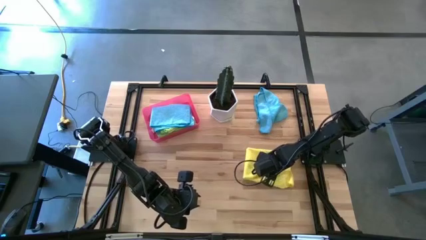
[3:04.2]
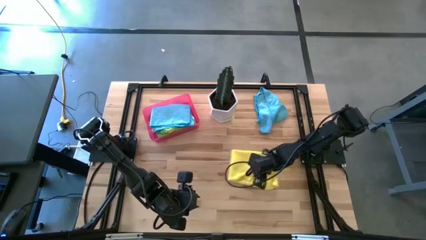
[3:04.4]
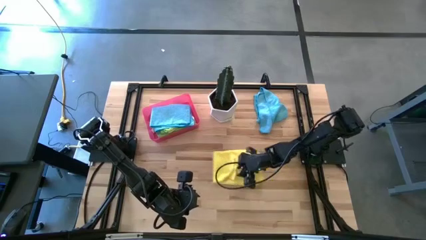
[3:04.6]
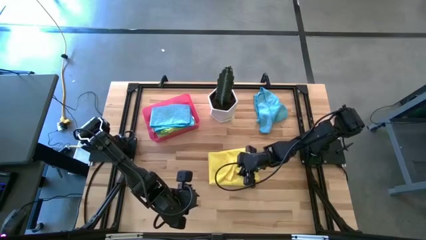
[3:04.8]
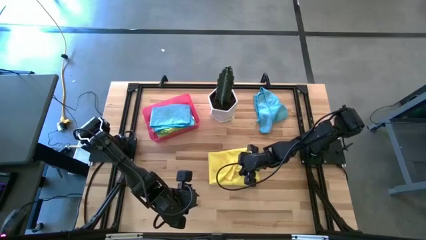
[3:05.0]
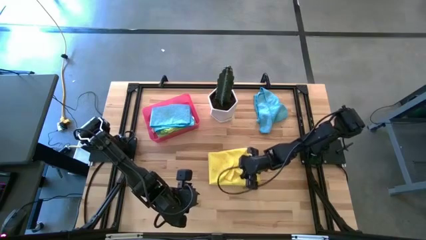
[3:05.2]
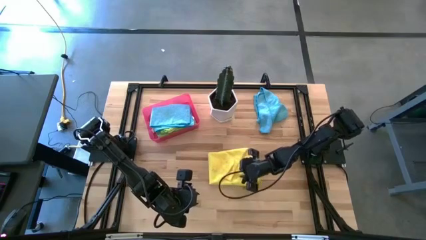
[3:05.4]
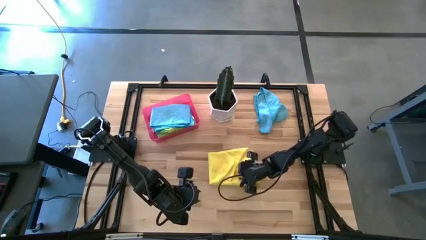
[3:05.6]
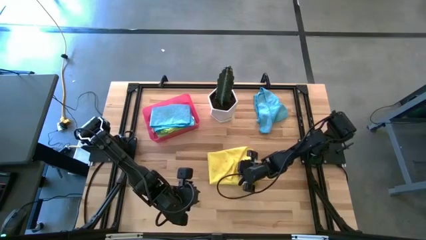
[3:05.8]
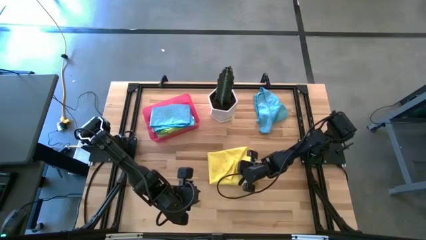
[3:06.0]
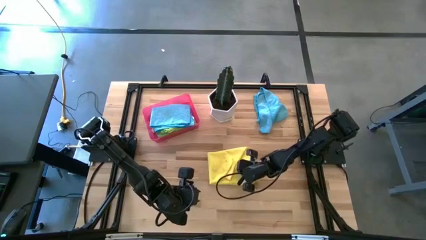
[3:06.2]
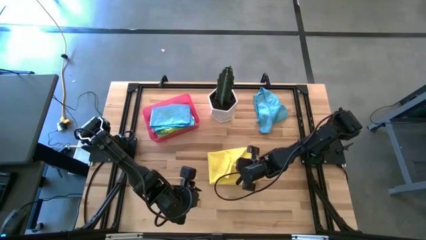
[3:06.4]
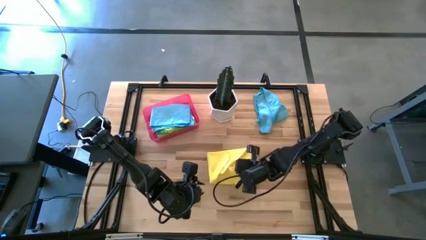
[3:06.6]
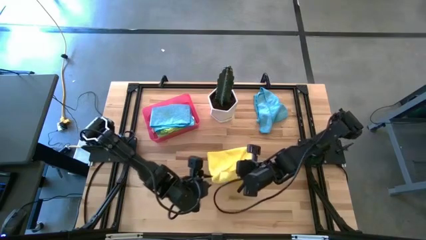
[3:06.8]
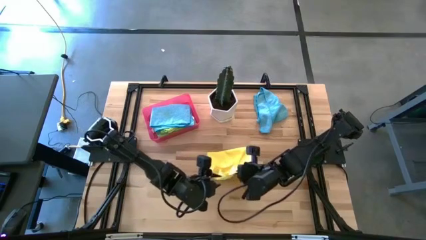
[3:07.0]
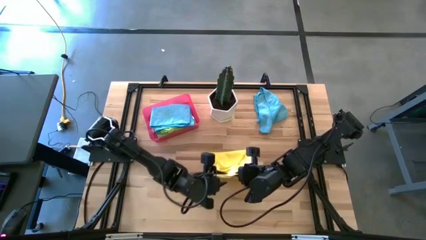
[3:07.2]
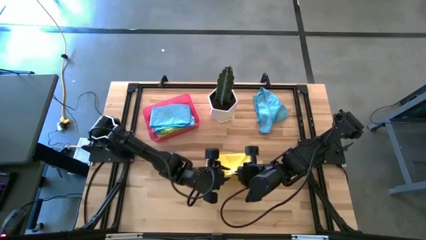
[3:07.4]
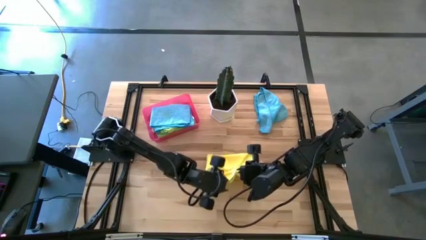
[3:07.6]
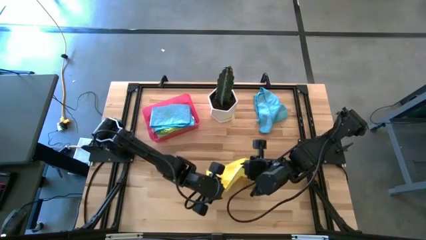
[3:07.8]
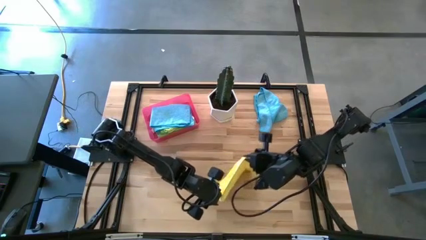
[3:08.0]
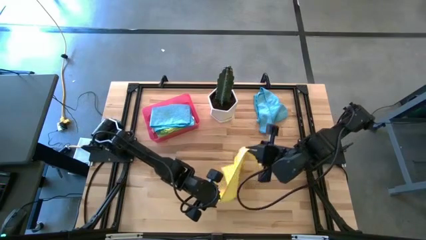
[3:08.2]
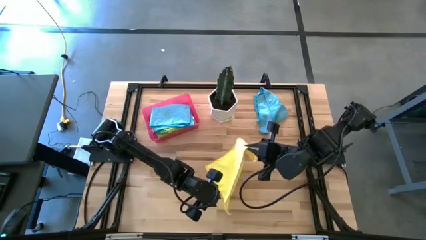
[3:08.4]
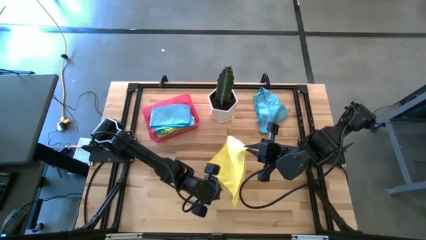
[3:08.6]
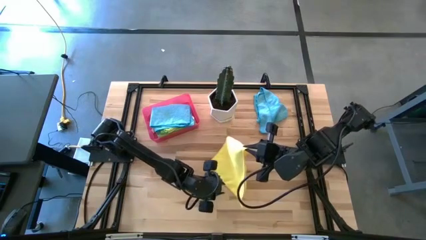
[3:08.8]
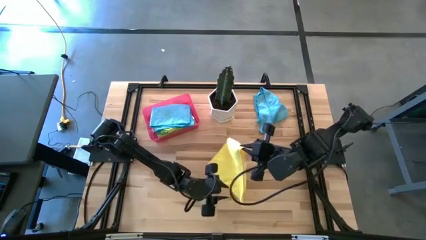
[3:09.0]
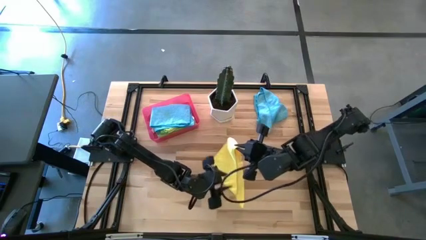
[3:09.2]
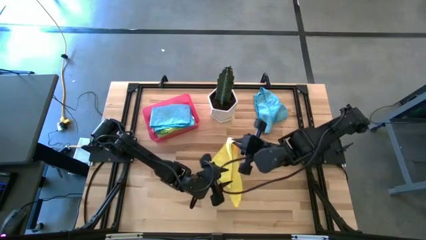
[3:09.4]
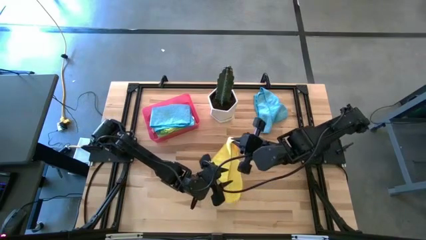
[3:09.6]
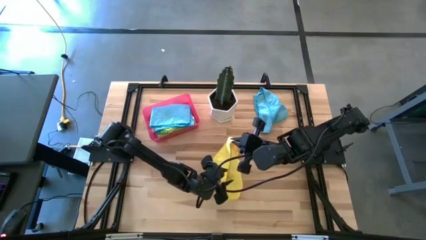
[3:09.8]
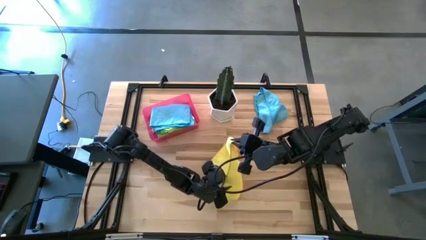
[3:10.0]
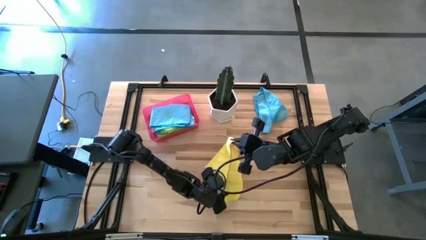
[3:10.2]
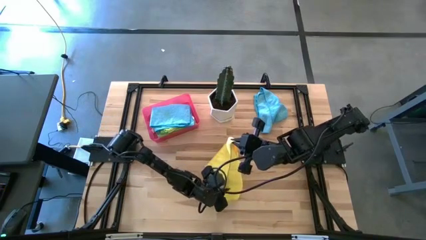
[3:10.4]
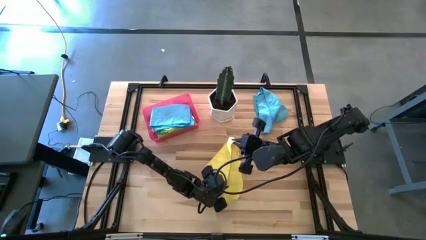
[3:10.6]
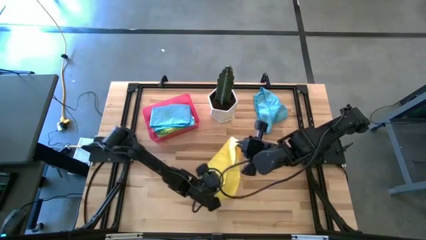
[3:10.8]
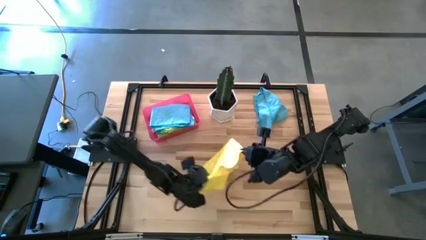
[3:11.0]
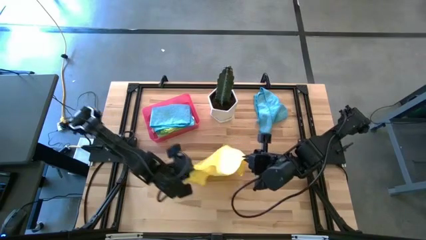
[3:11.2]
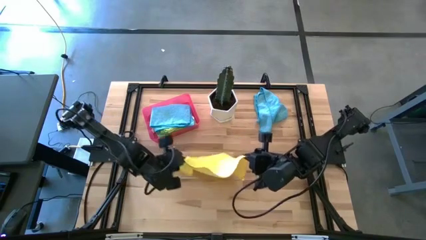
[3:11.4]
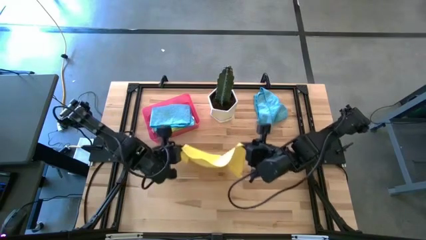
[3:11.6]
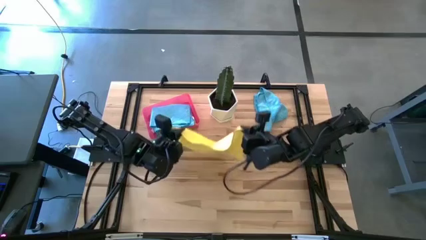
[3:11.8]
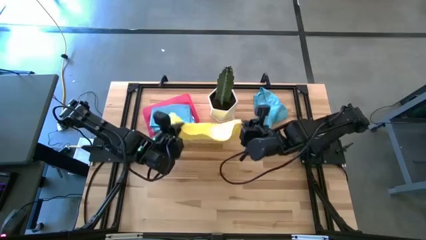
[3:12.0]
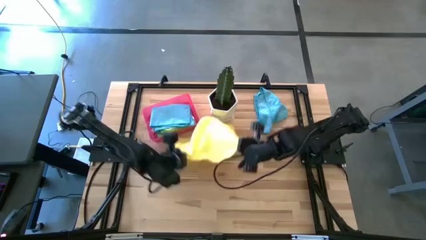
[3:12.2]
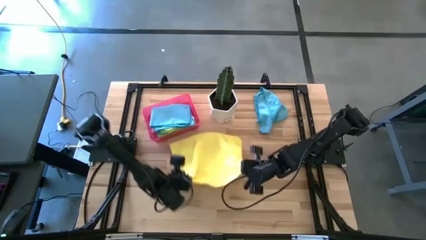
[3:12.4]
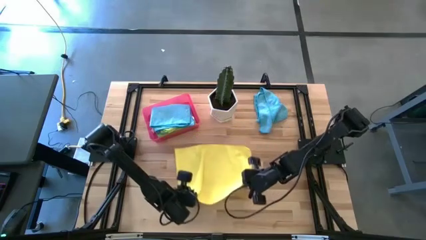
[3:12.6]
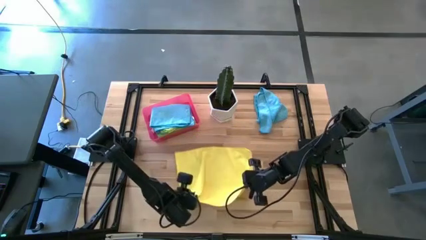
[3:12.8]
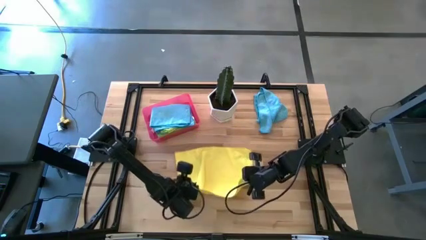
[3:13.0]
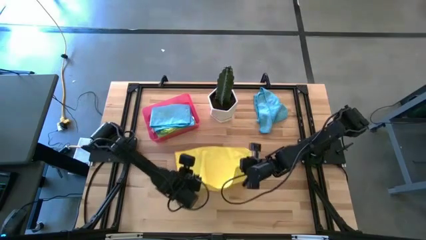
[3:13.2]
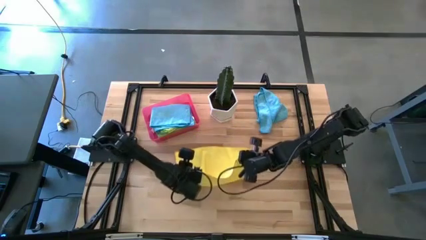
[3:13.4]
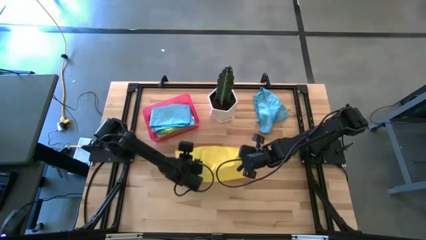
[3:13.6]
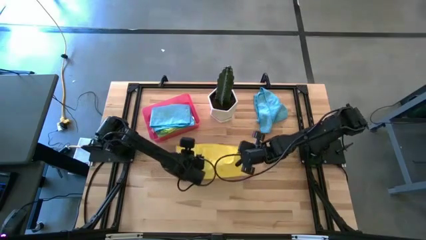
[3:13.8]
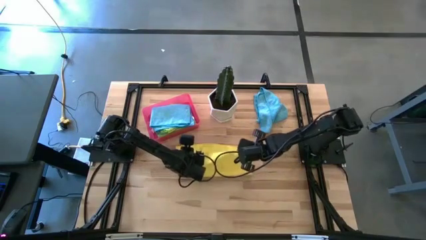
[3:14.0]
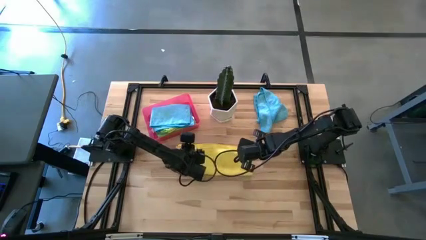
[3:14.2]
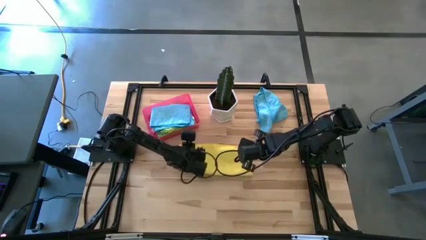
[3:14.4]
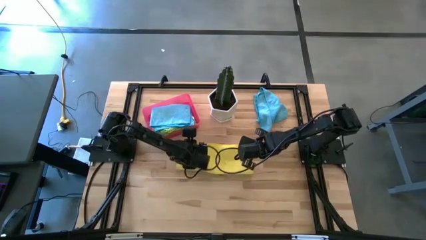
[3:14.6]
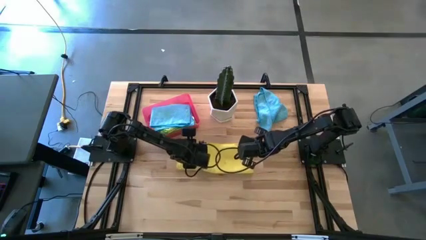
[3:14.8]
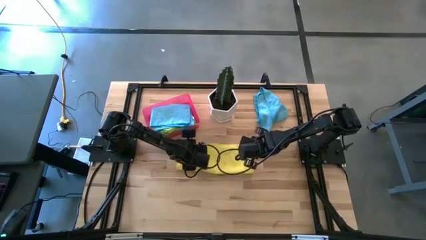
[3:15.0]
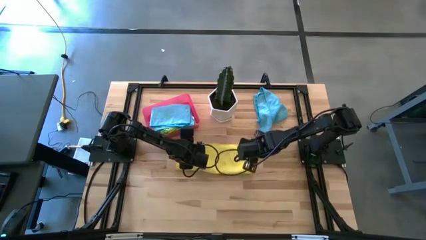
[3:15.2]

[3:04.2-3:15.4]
Task: Fold microfiber towels
Fold the yellow microfiber cloth

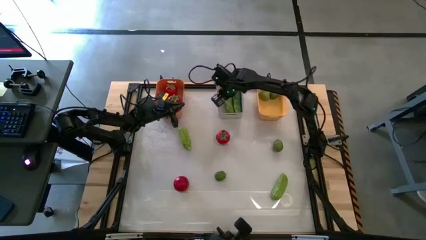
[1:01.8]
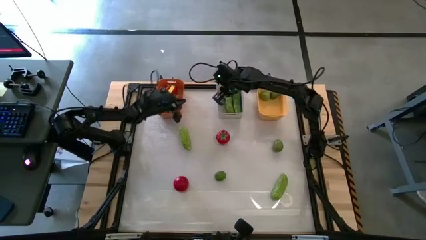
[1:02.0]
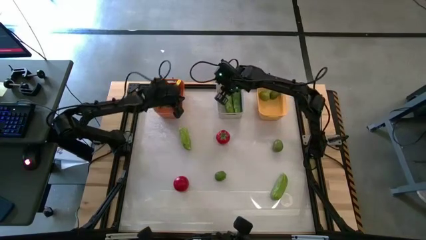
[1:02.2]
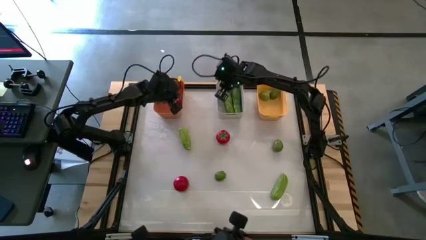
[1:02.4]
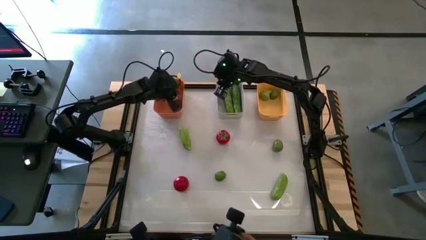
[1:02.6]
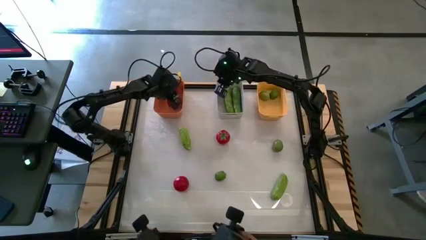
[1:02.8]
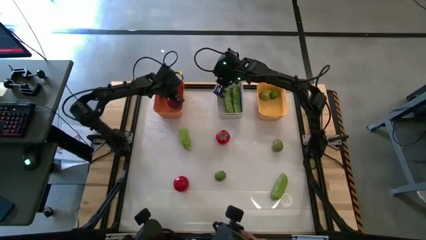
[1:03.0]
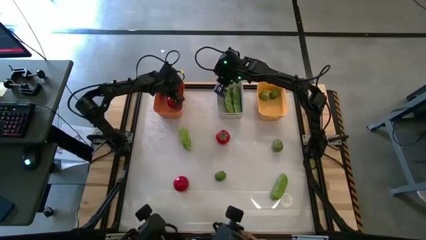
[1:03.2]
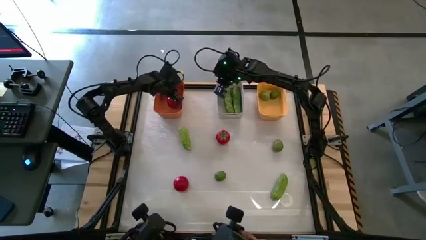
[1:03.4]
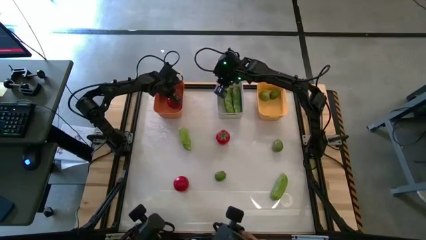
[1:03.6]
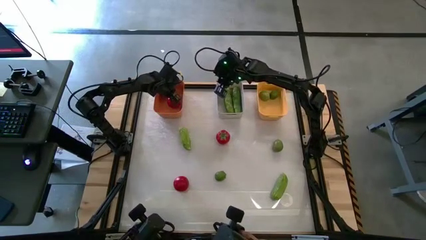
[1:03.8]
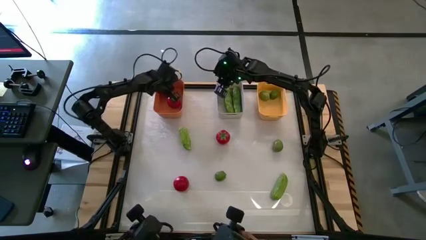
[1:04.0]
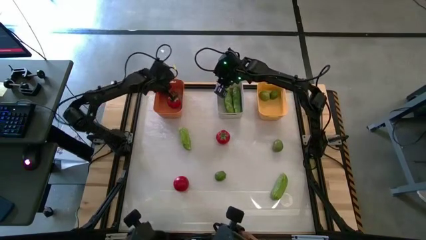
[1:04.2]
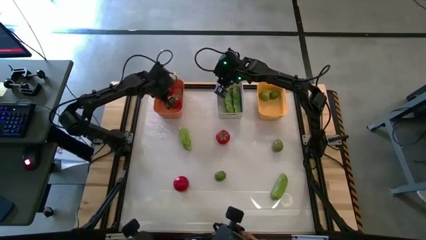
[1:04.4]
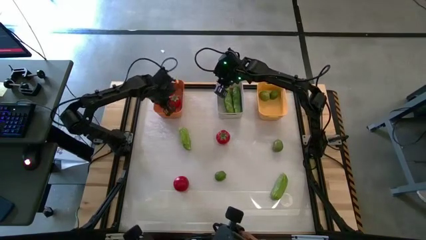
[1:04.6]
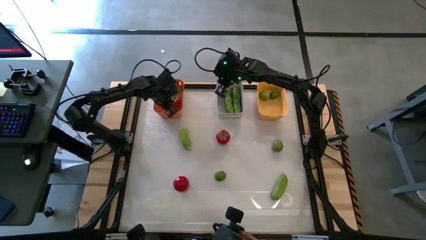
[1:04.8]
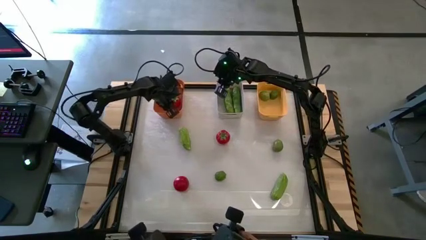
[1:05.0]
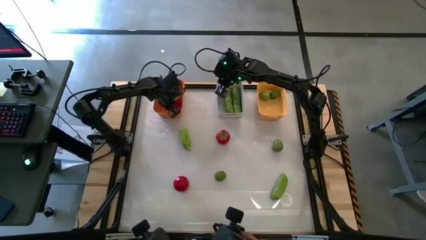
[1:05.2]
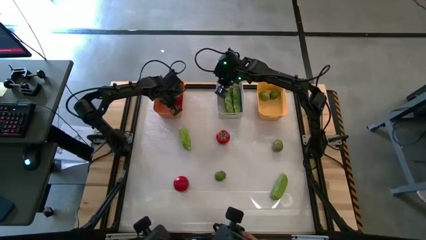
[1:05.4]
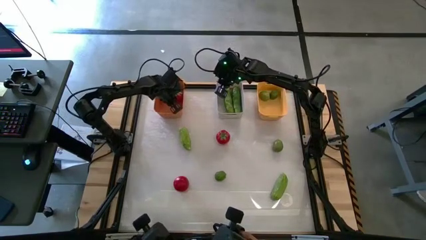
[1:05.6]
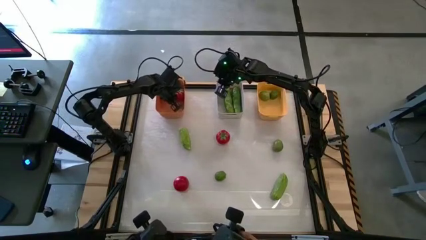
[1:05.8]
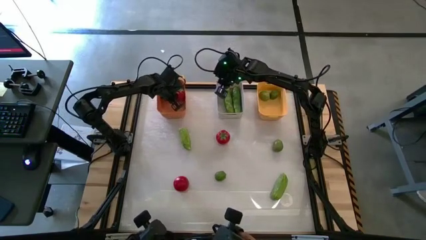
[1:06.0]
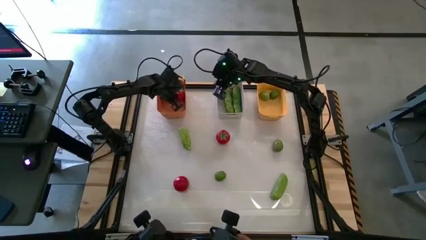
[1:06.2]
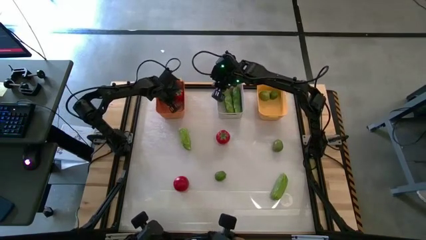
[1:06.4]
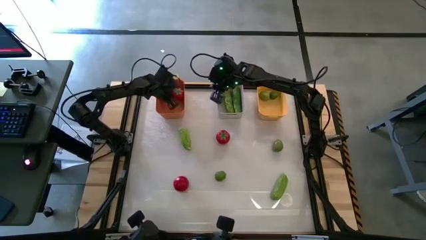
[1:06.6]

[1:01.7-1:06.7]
Task: Sort produce into baskets
Adjust the tomatoes in the orange bin
